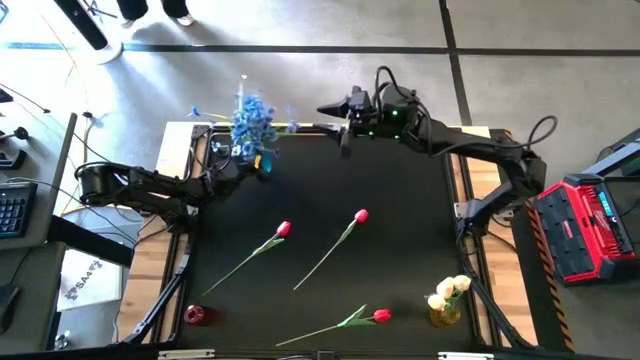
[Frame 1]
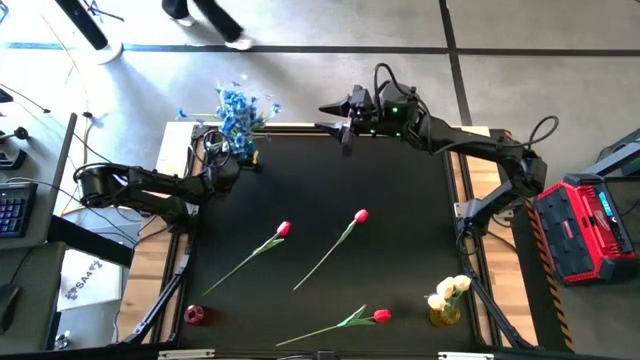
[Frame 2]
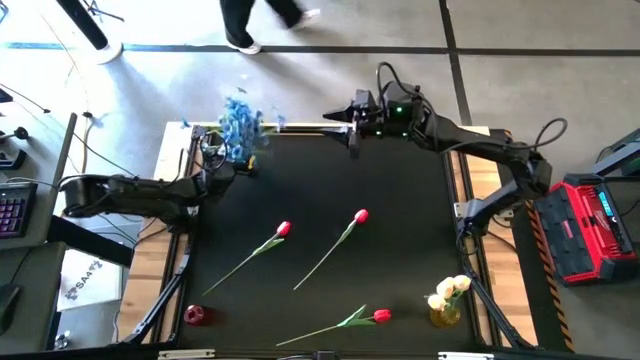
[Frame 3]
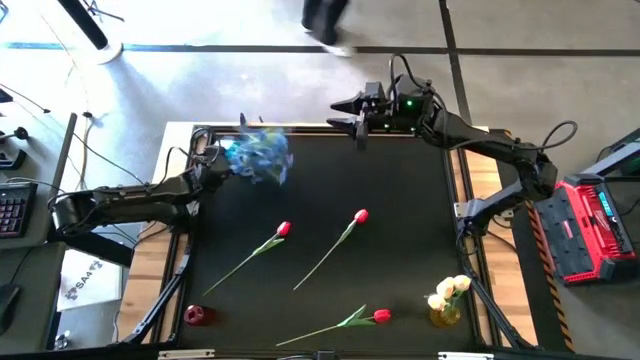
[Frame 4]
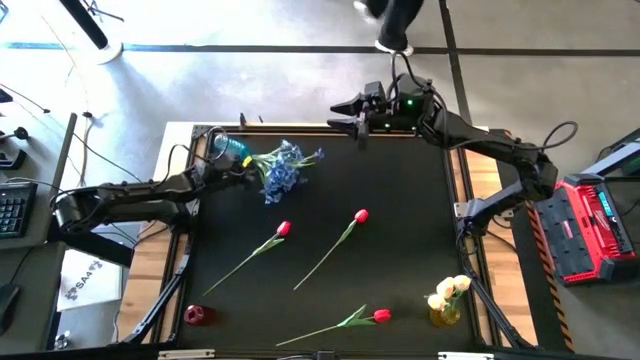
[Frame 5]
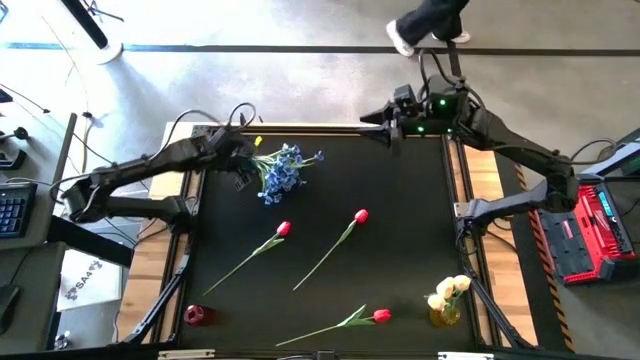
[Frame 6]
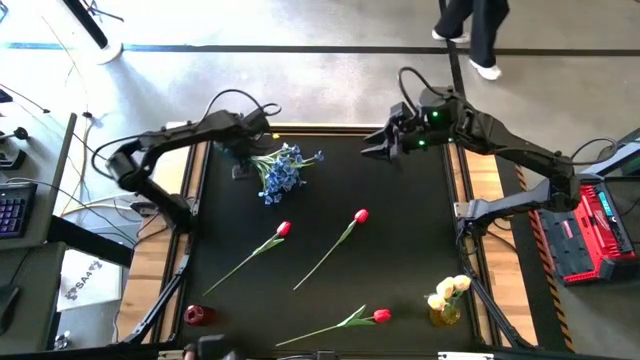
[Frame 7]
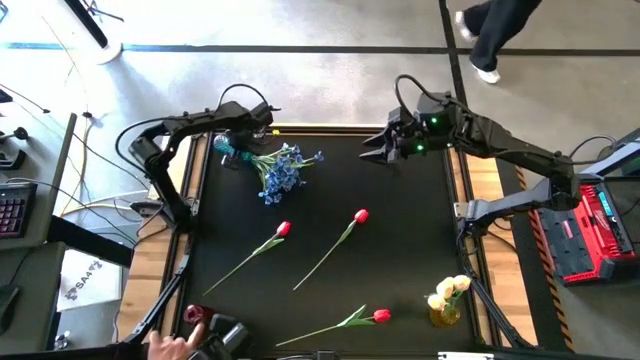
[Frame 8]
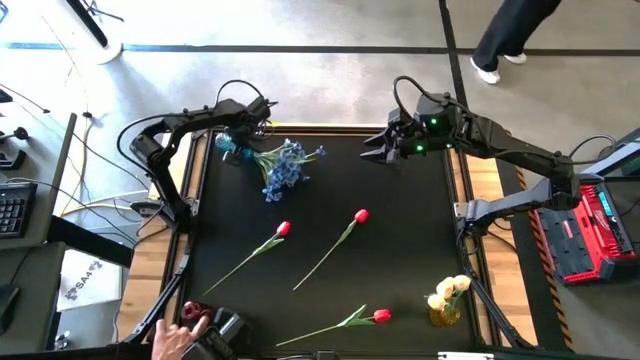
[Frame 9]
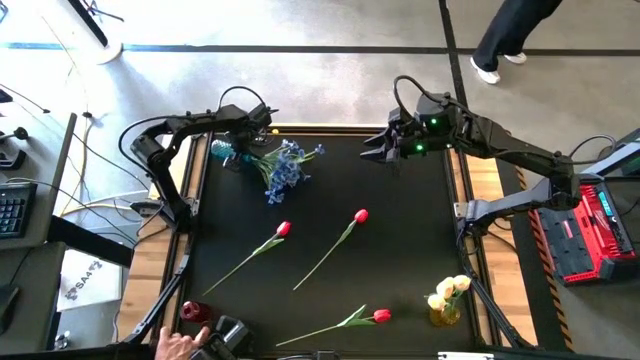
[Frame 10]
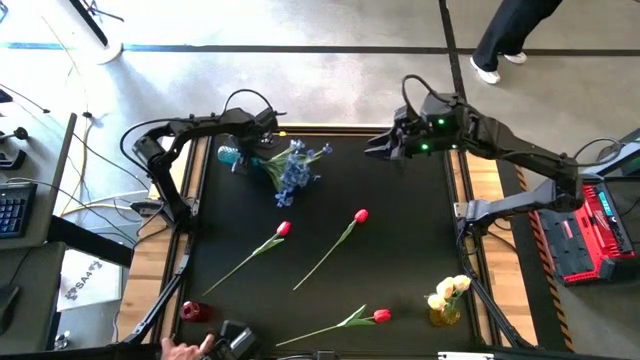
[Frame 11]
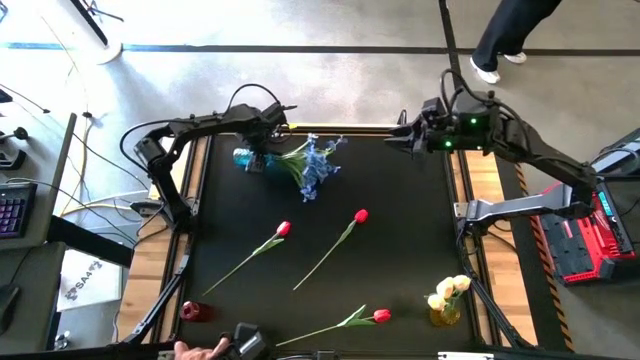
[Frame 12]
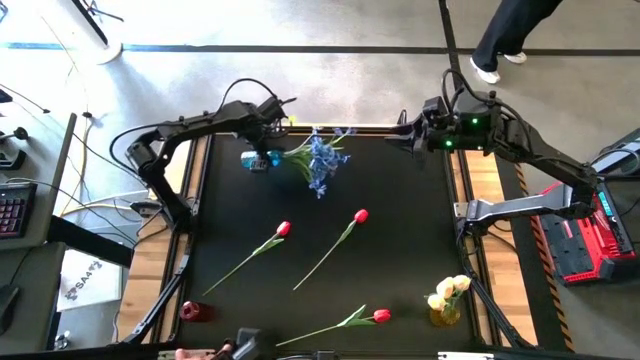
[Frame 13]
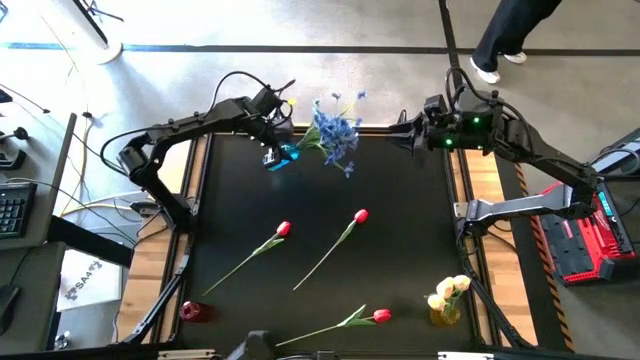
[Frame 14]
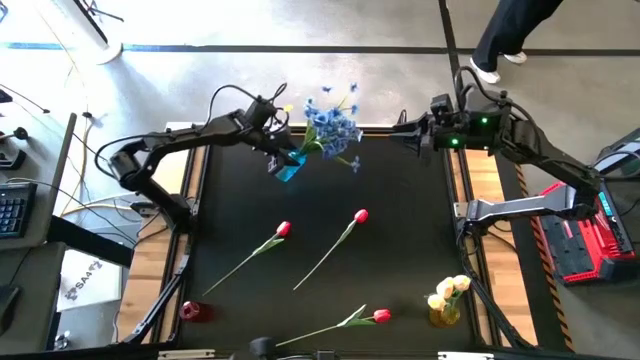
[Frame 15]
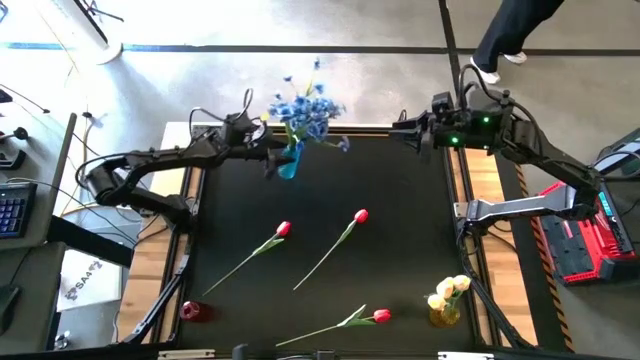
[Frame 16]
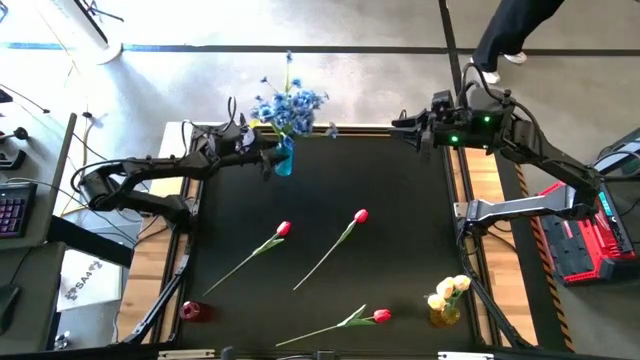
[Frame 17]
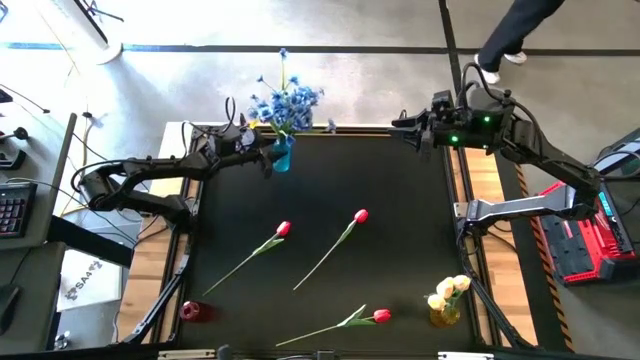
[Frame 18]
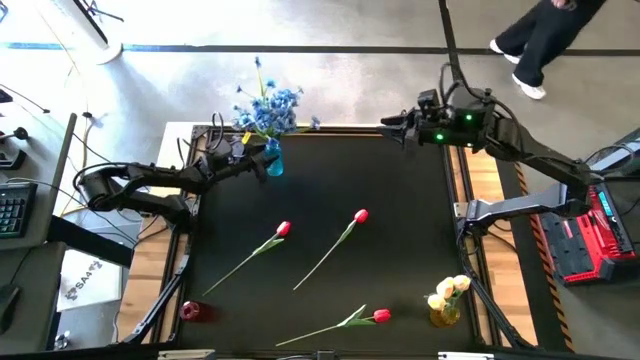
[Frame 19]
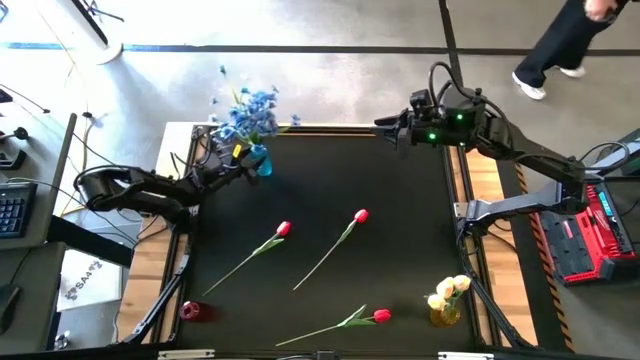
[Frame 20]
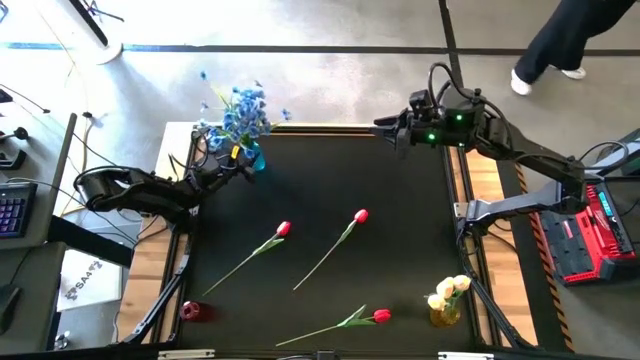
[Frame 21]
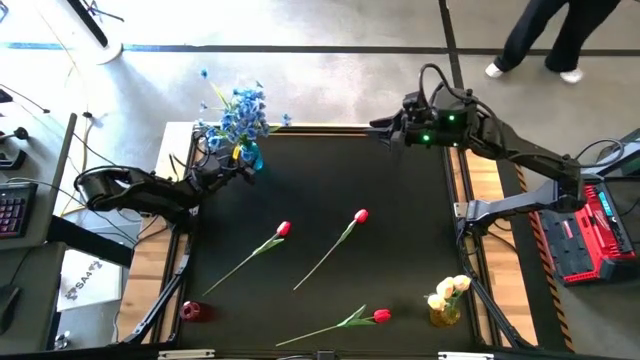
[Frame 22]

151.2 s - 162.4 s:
Task: Sort flowers into vase by color
Adjust the blue vase on the top left of the table

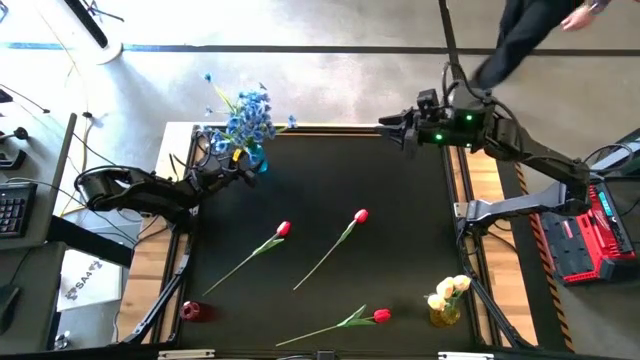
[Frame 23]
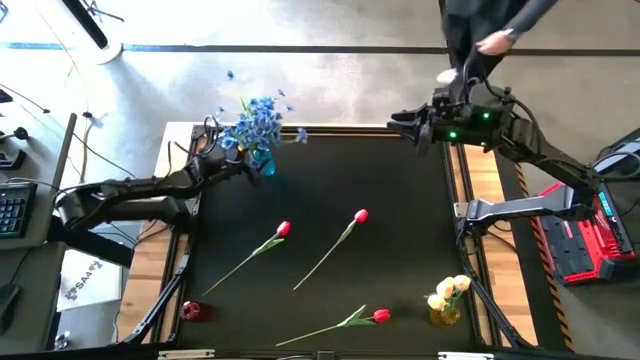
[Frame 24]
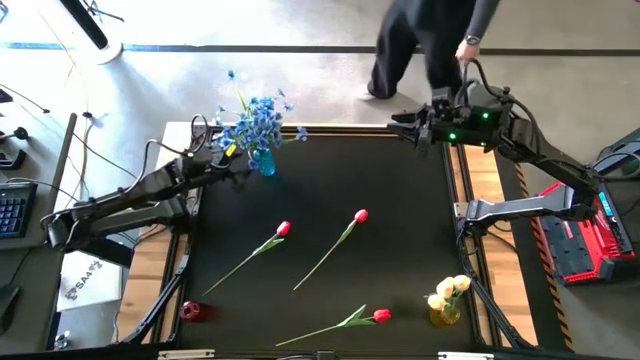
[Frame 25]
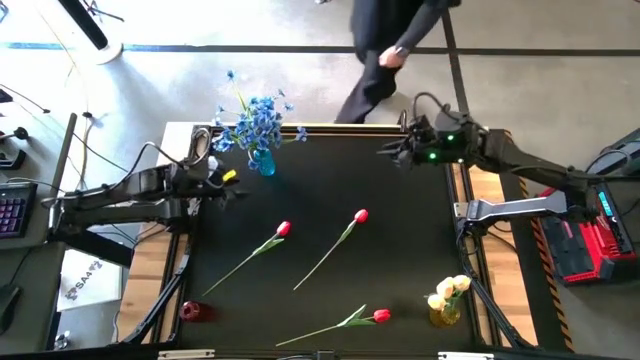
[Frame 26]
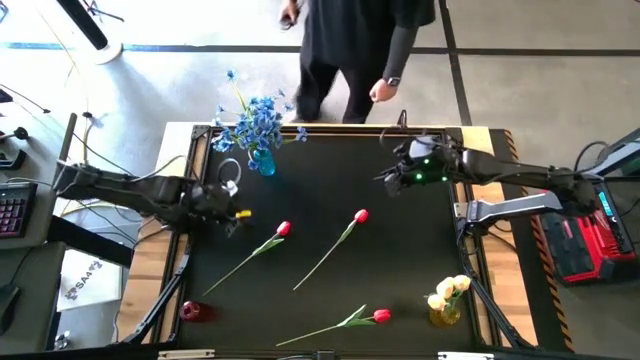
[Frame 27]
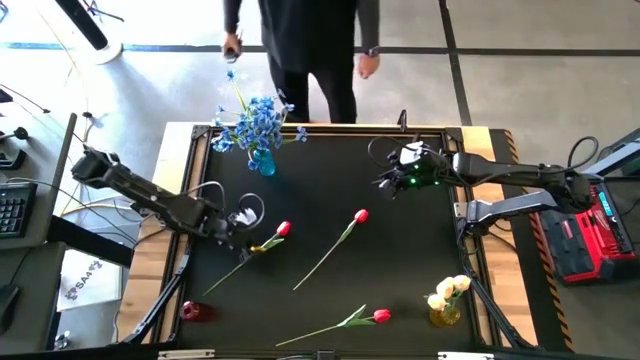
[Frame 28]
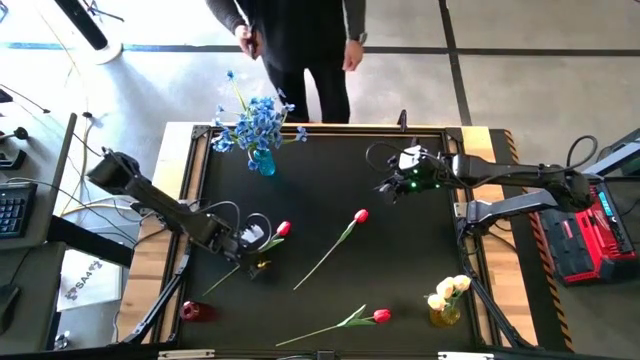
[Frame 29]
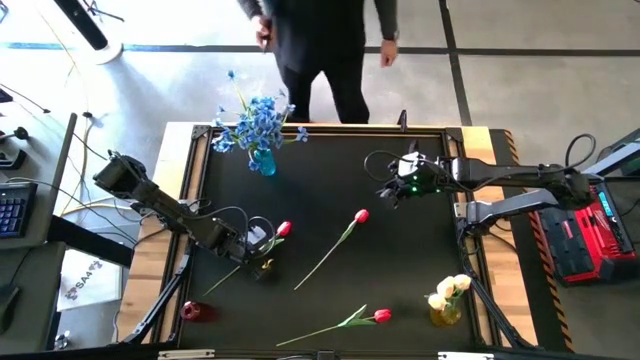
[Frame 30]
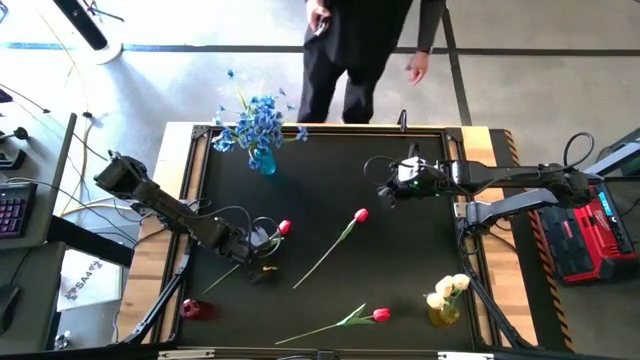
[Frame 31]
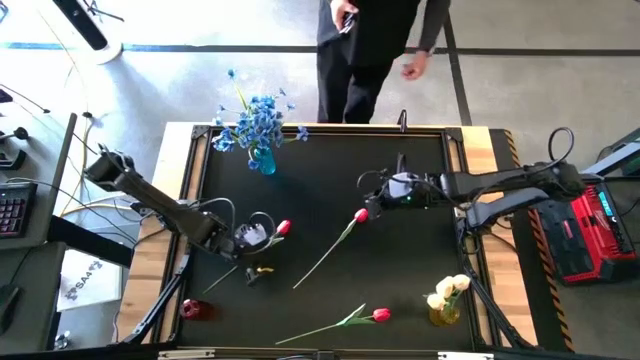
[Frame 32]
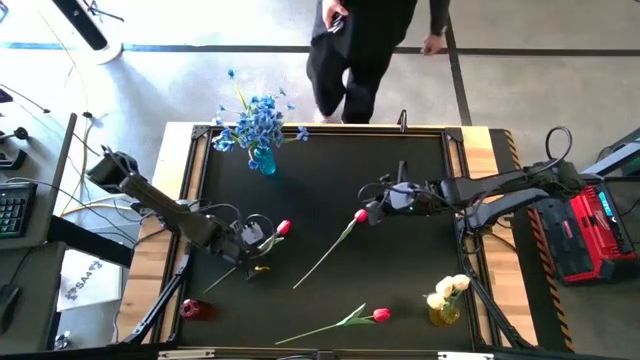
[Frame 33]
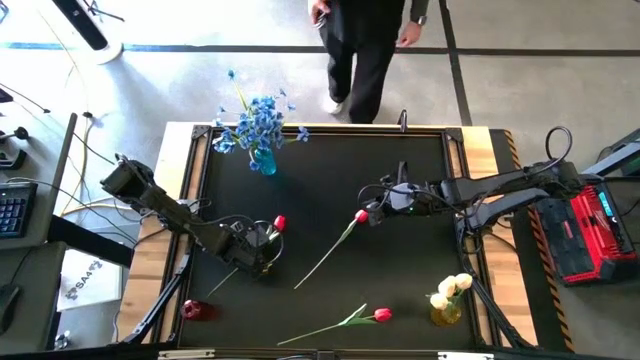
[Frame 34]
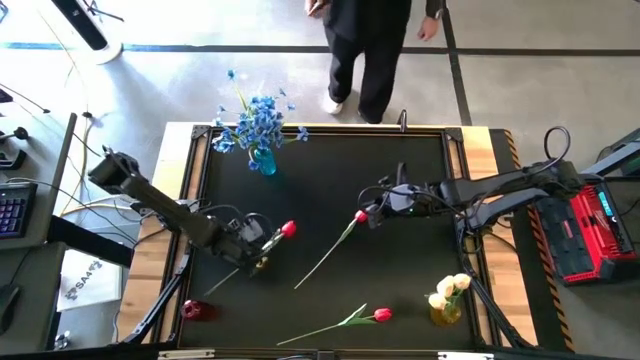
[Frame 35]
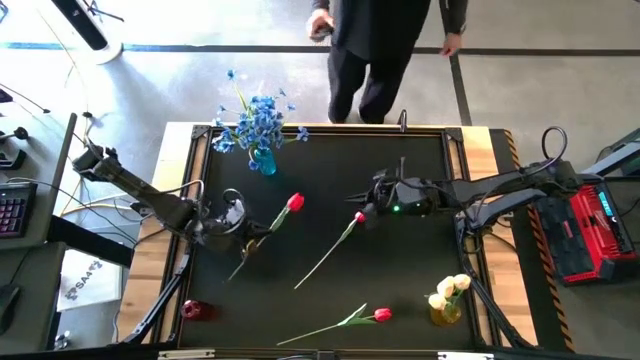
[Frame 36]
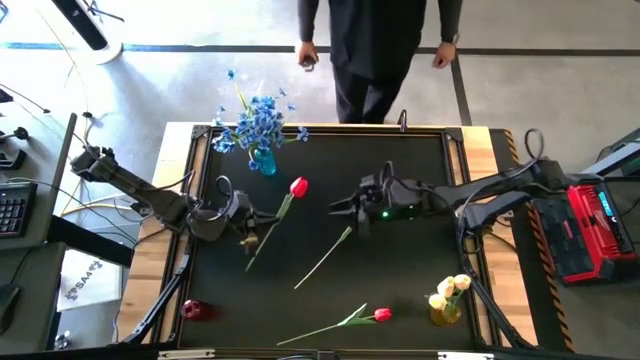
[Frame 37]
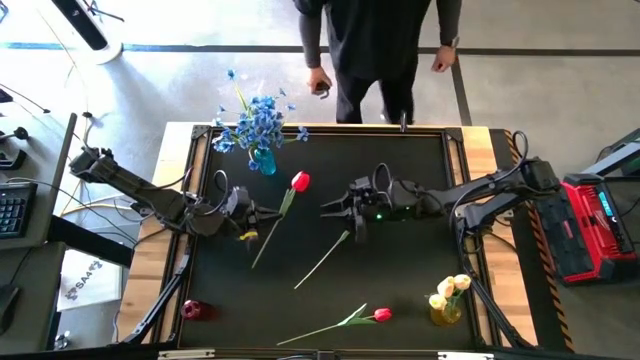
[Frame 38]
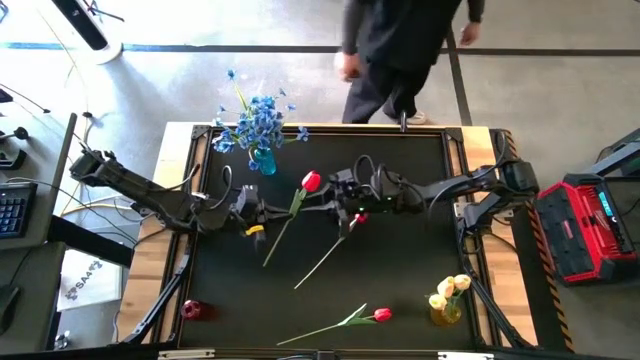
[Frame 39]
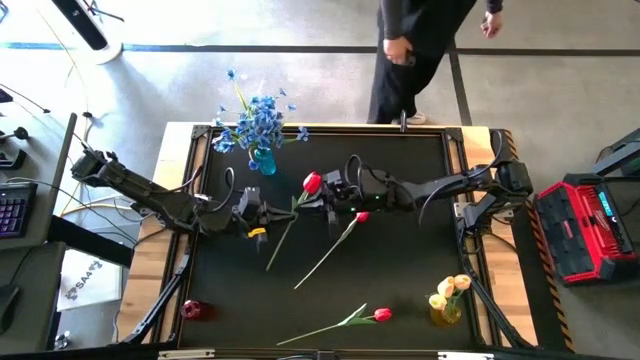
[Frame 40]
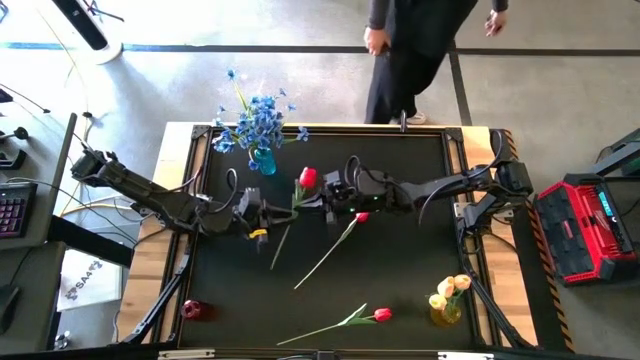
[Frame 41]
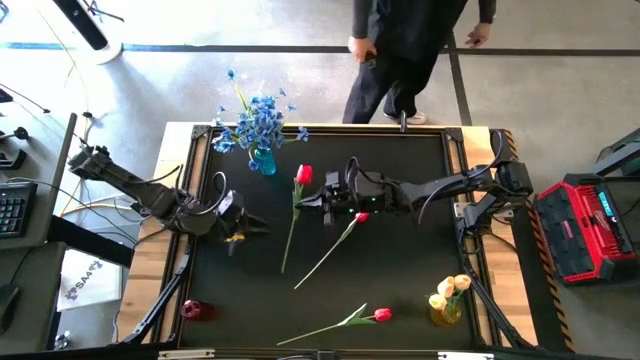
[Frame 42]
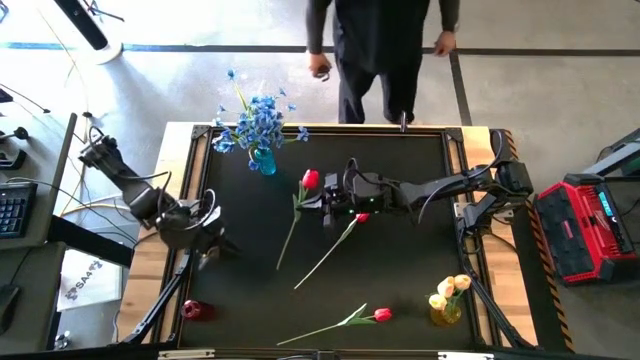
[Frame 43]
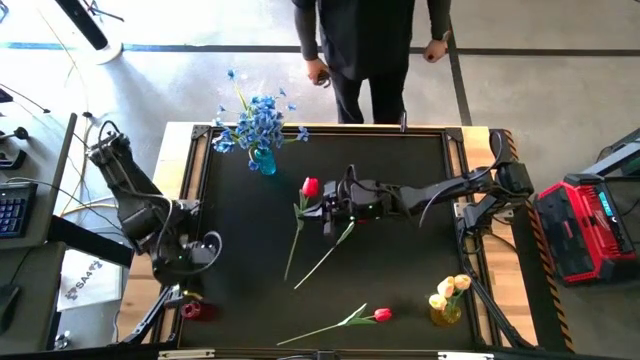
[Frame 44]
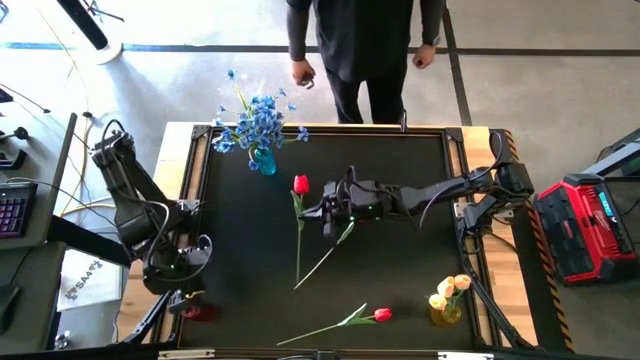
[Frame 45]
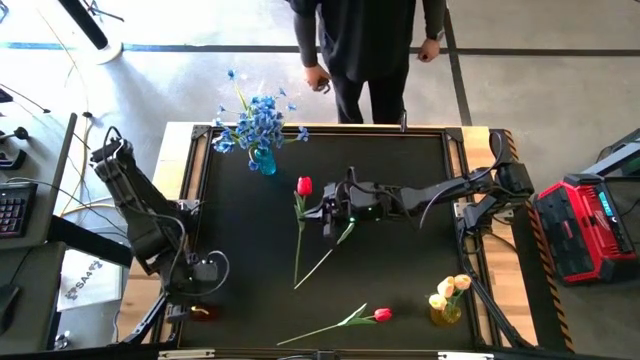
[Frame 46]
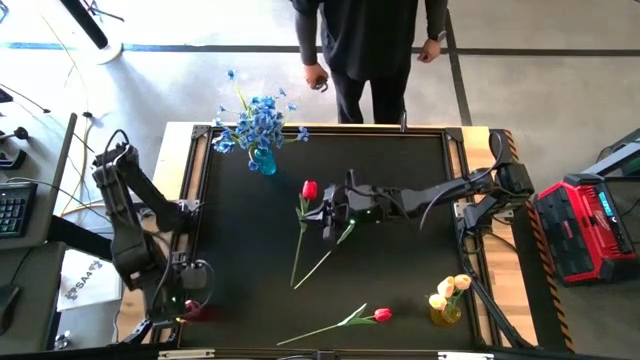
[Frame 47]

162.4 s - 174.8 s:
Put the top left red tulip into the red vase
